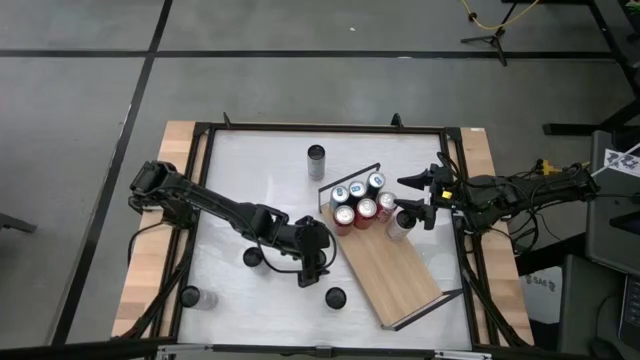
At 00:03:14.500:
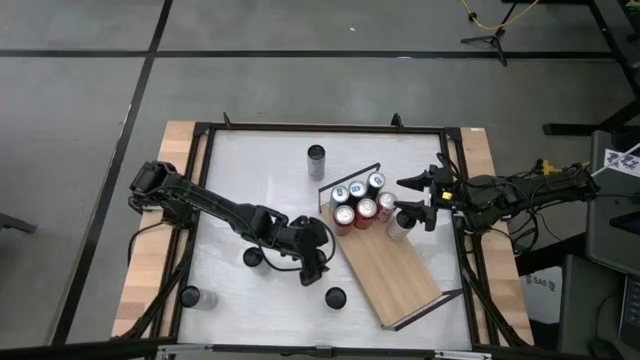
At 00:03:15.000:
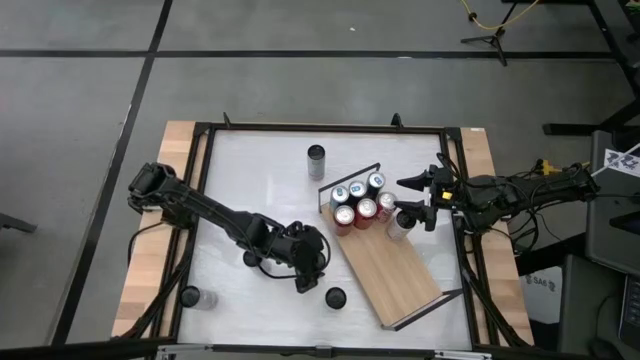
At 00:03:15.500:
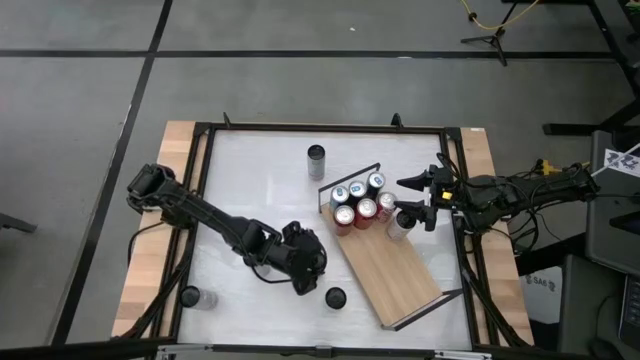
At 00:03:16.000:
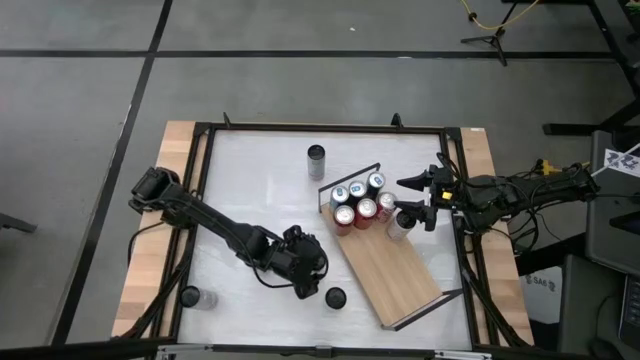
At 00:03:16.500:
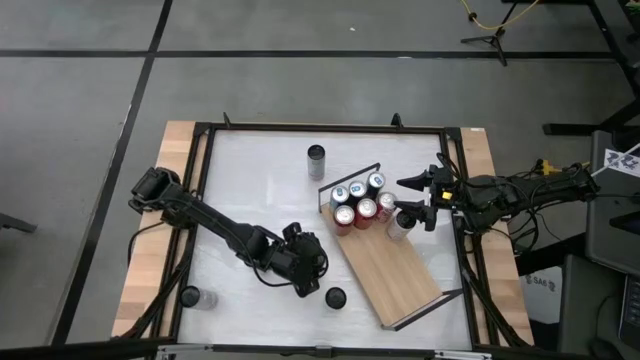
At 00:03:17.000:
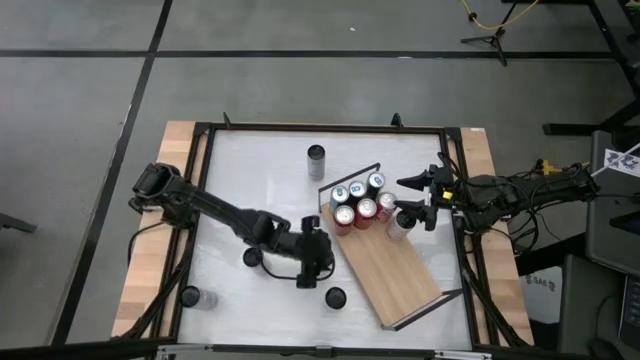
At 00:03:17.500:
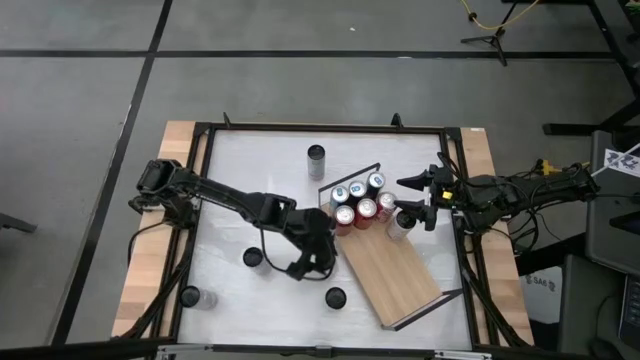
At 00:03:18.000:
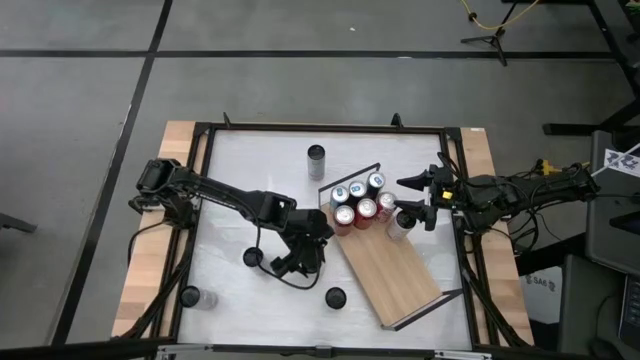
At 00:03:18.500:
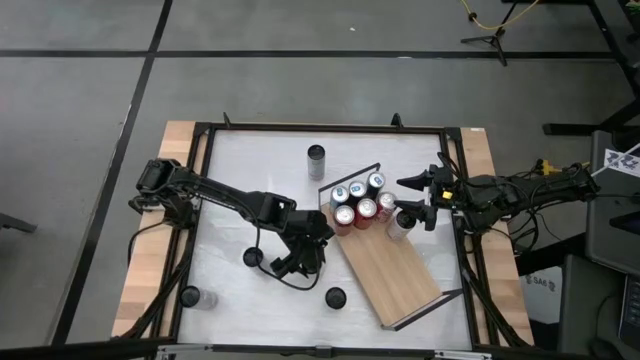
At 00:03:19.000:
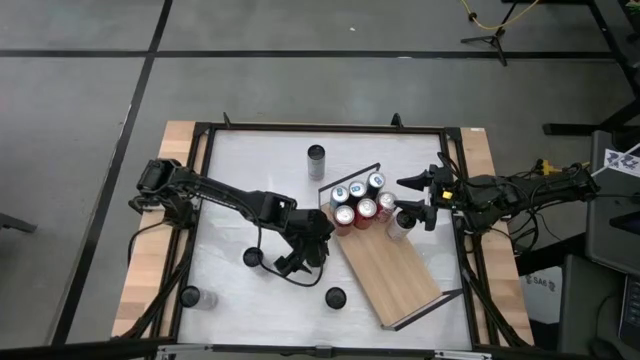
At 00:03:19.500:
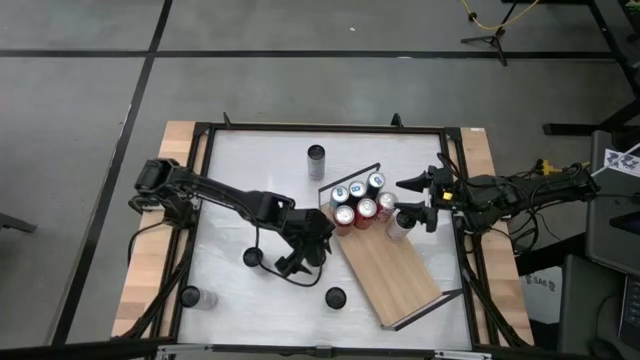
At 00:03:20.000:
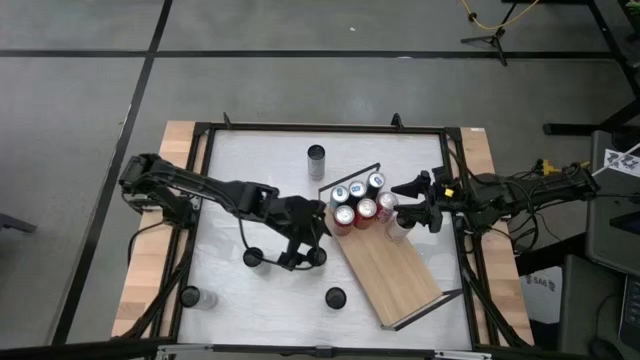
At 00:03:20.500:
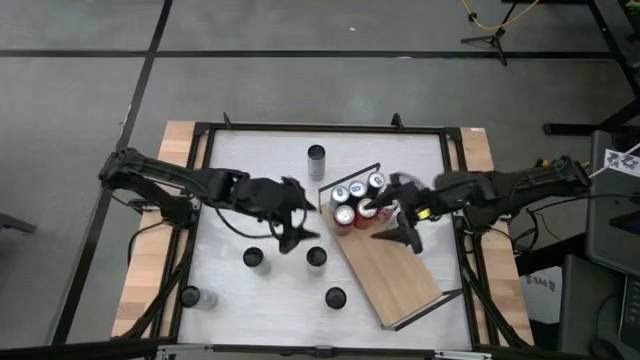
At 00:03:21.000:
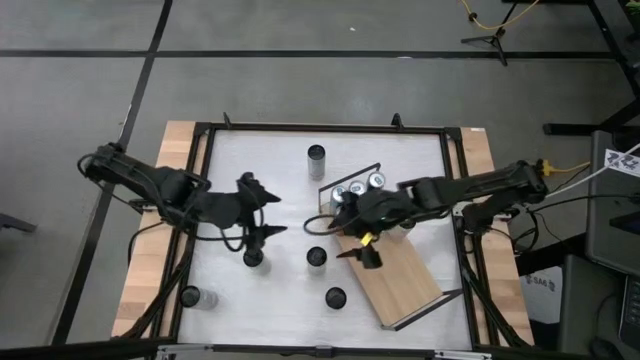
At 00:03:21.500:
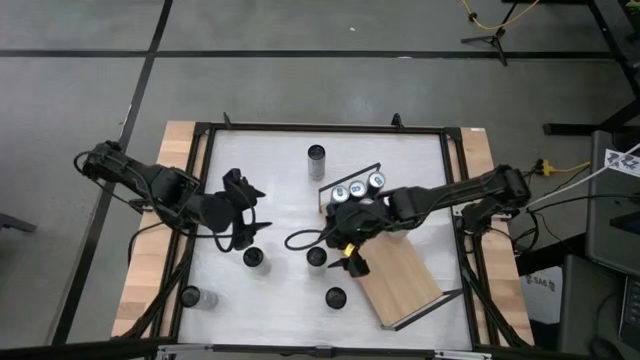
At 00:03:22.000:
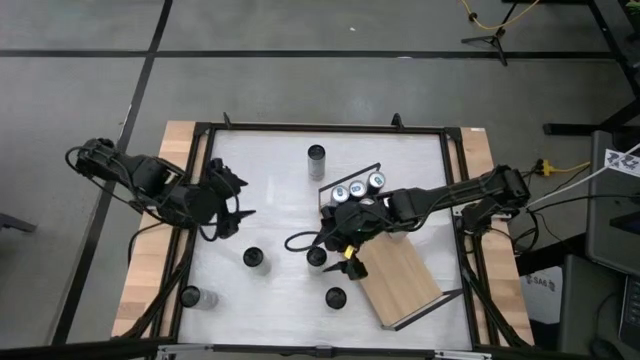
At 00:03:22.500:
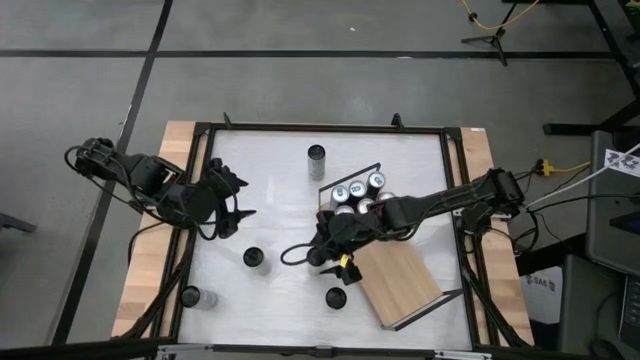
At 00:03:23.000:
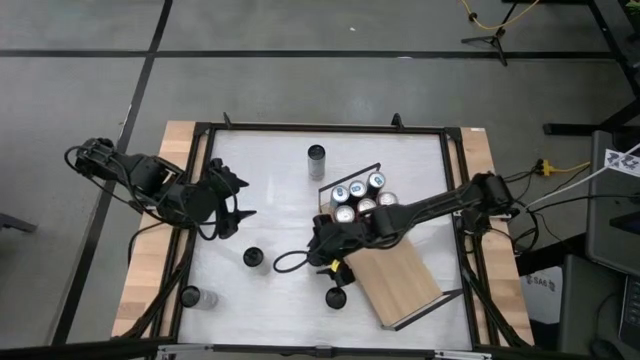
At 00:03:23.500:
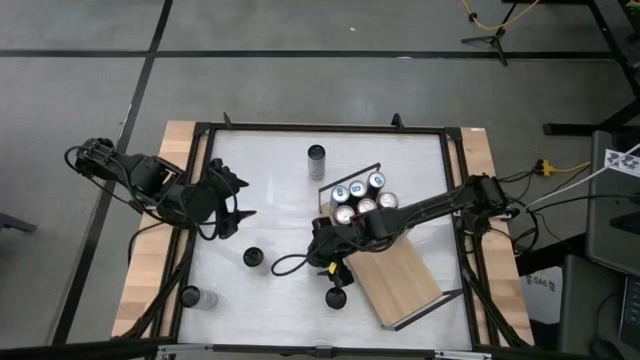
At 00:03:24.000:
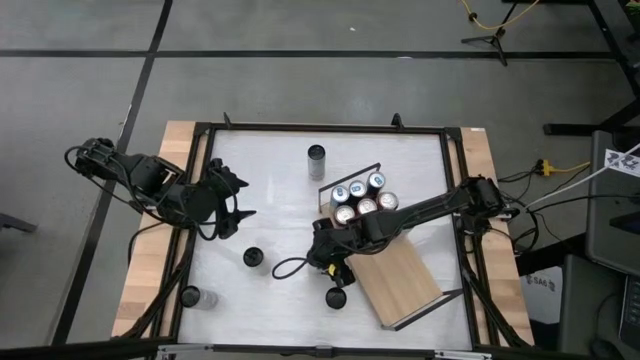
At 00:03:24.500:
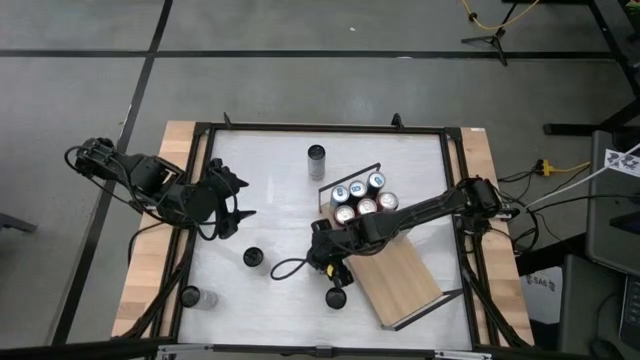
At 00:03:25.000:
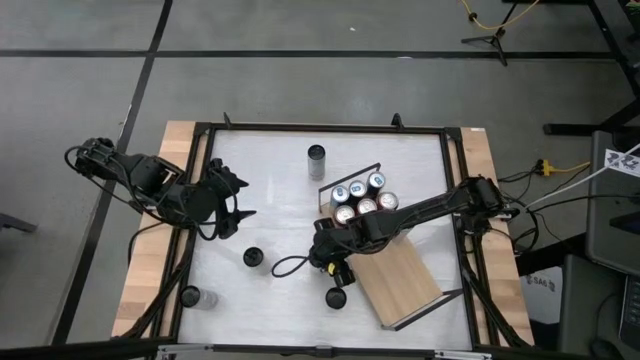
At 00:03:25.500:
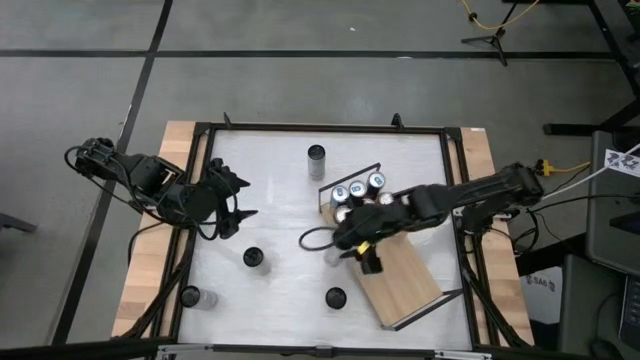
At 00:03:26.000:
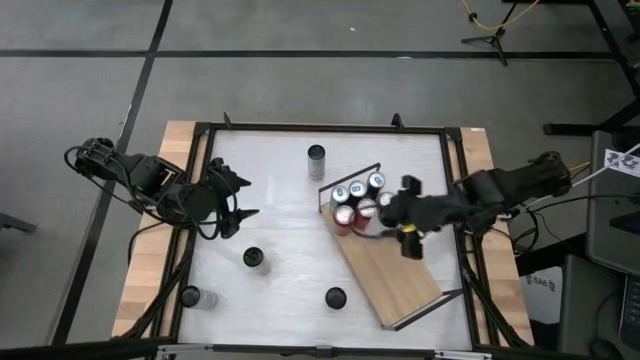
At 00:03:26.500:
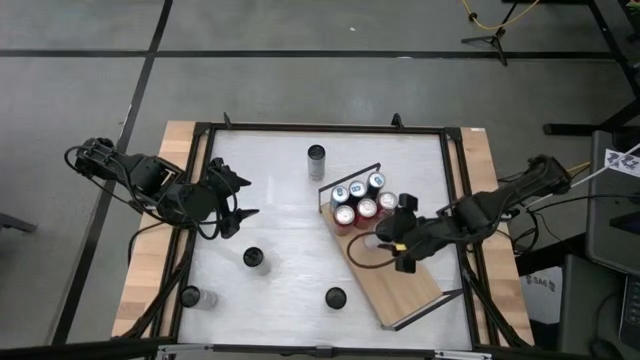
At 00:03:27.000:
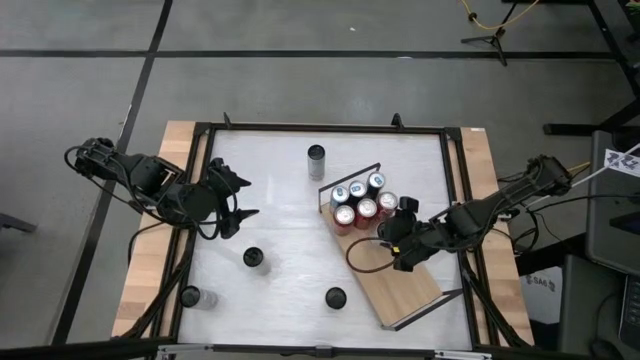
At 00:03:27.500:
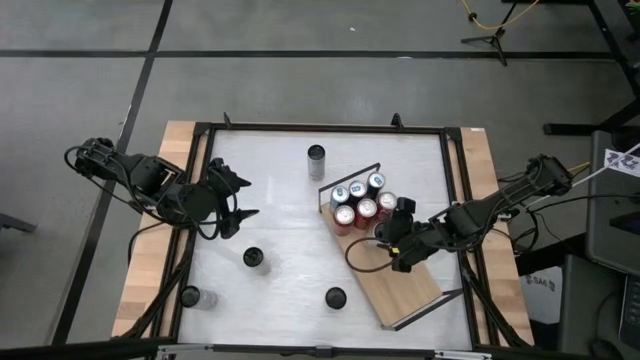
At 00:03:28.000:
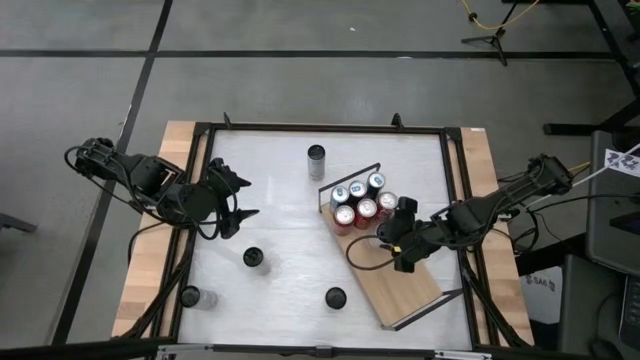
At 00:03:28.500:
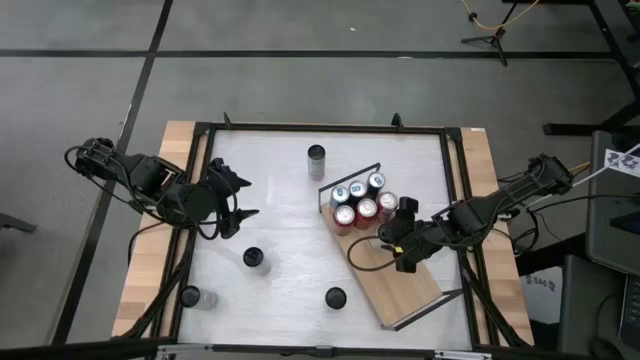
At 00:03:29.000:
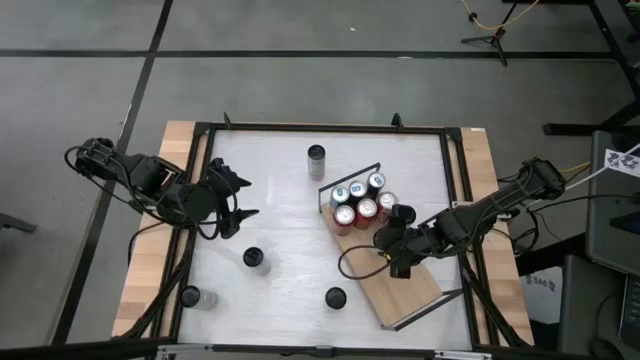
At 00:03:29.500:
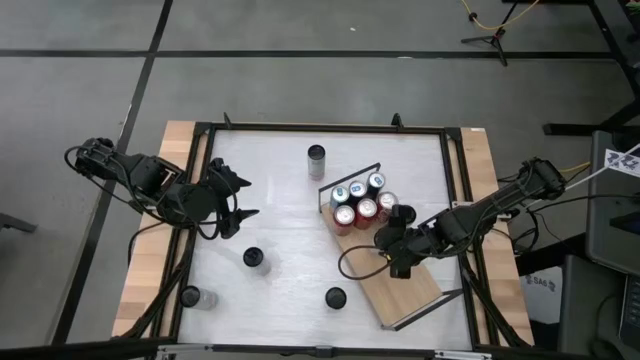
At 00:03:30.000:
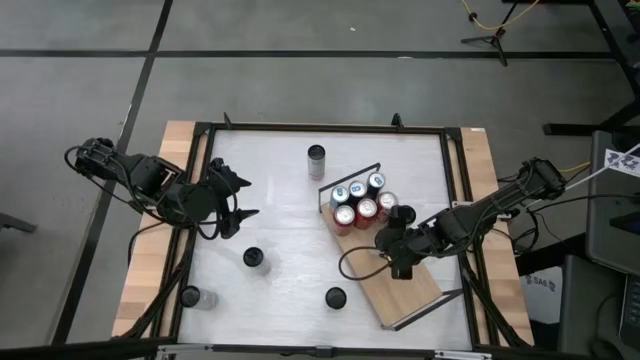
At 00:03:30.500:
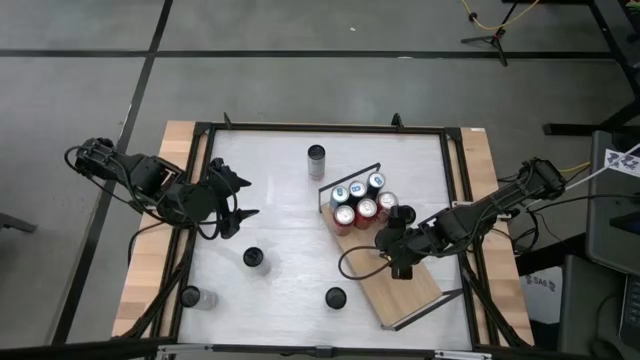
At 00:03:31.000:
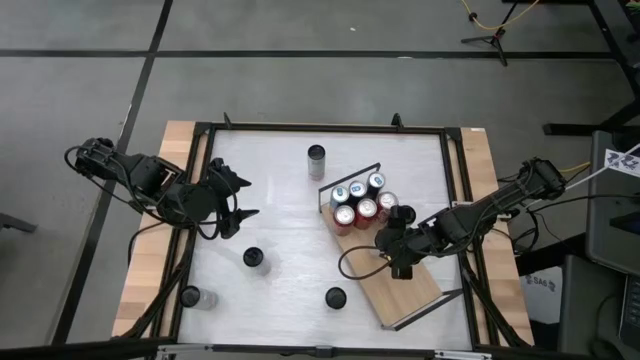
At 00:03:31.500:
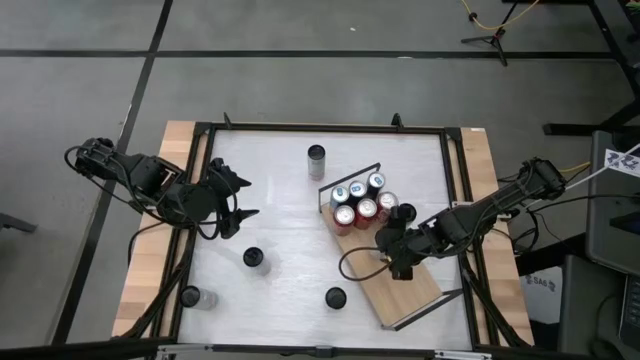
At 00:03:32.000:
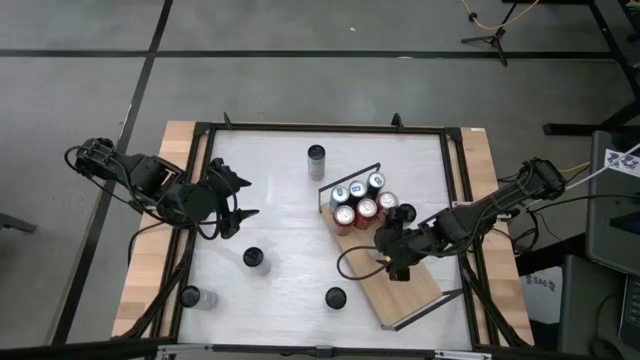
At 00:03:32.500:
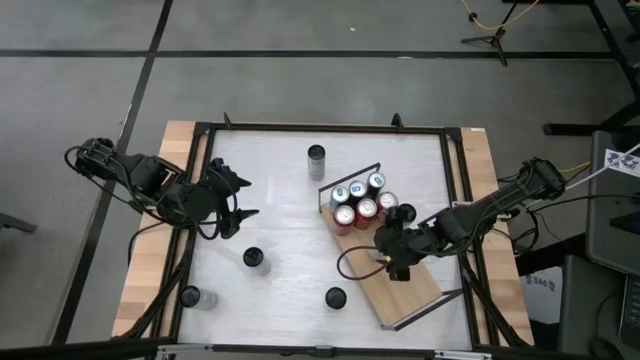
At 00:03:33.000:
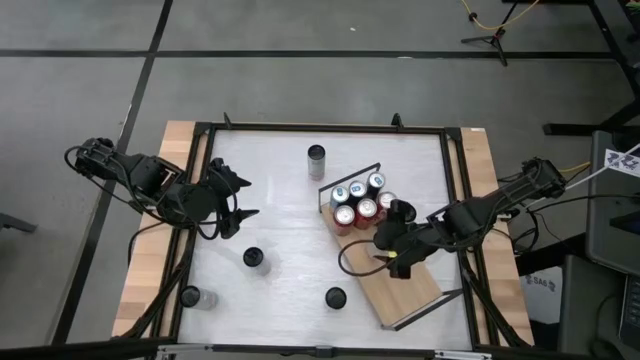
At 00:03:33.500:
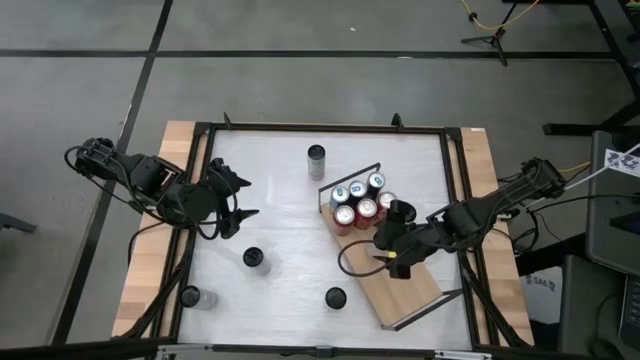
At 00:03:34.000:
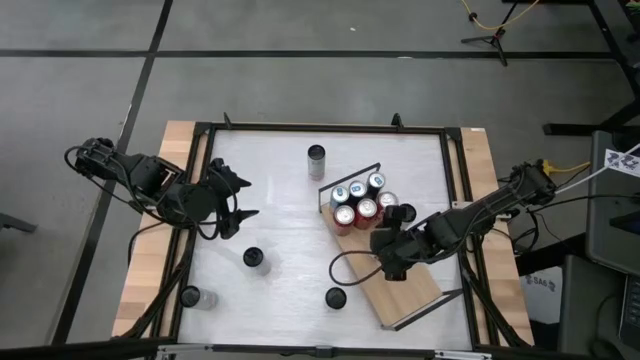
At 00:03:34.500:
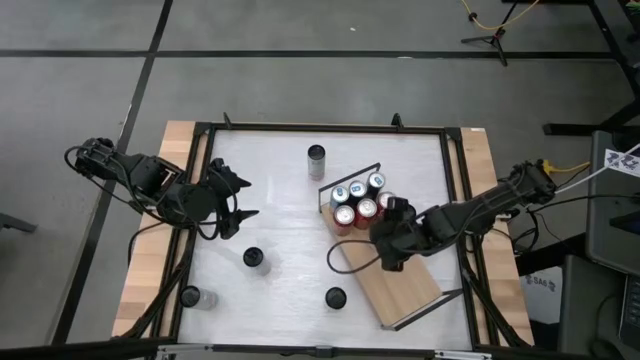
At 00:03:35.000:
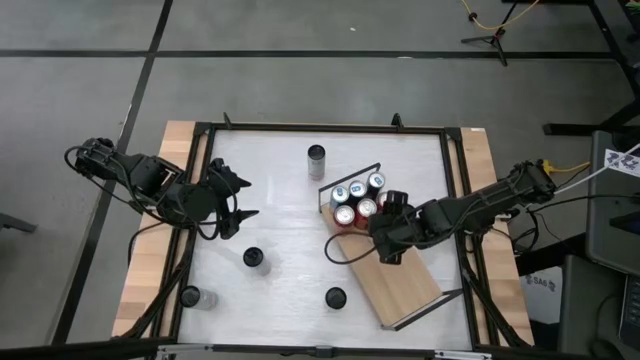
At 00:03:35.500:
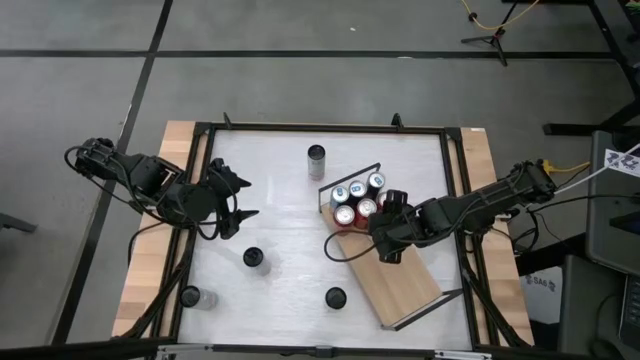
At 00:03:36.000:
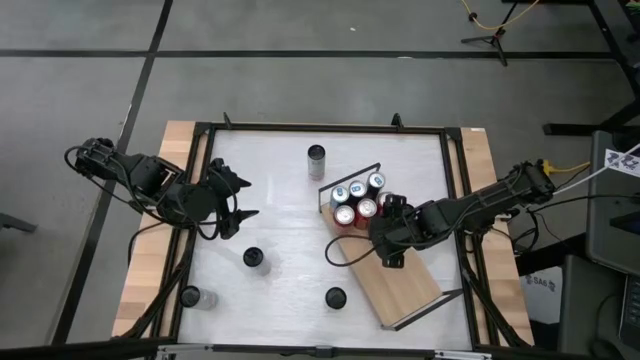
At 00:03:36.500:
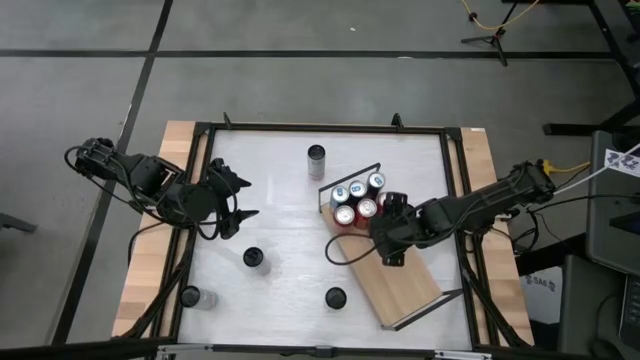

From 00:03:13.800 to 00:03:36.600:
Task: Place canned beverage on shelf
Put the white pink soda can on the shelf aligned with the other white pink soda can
